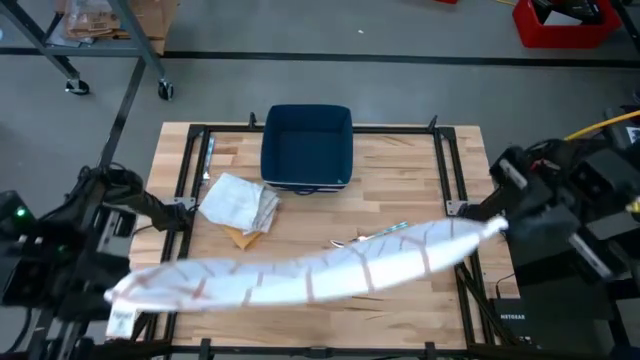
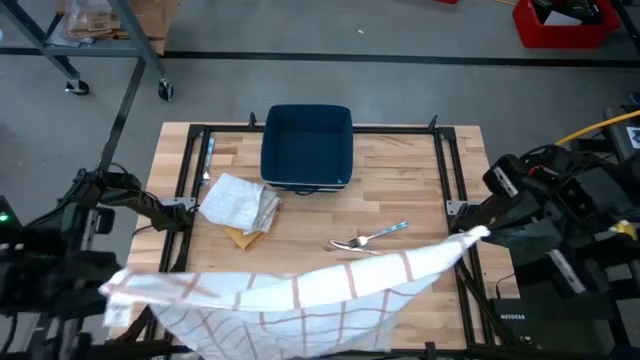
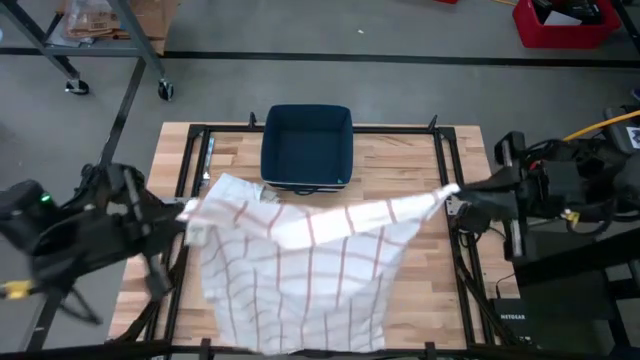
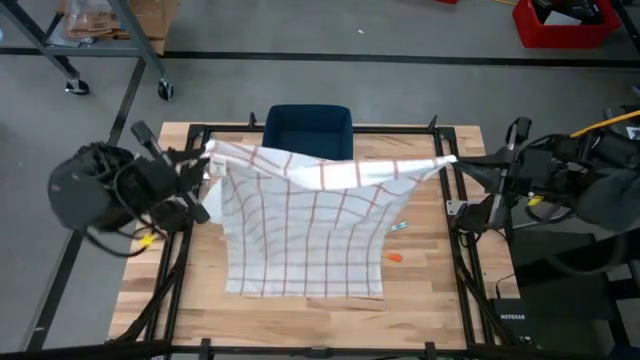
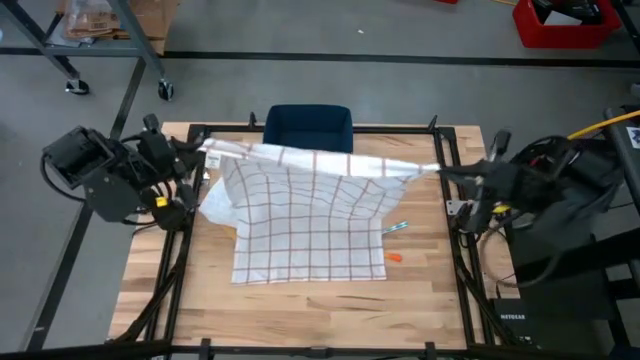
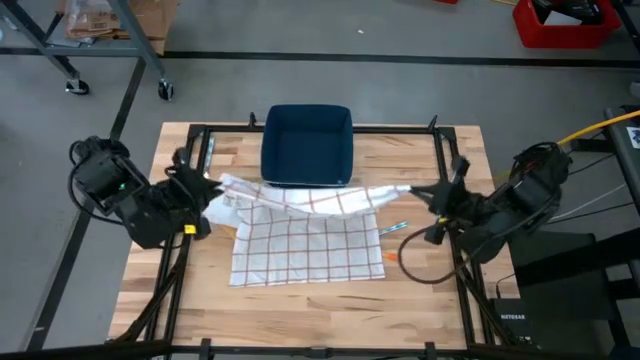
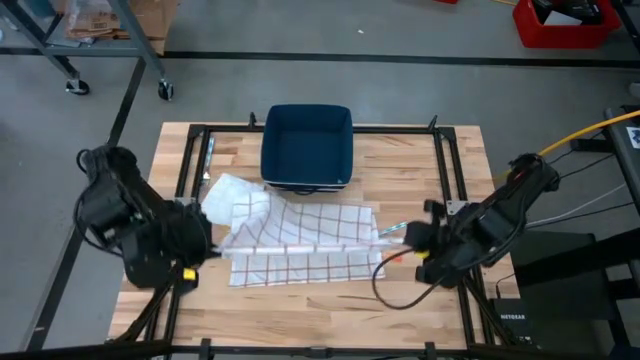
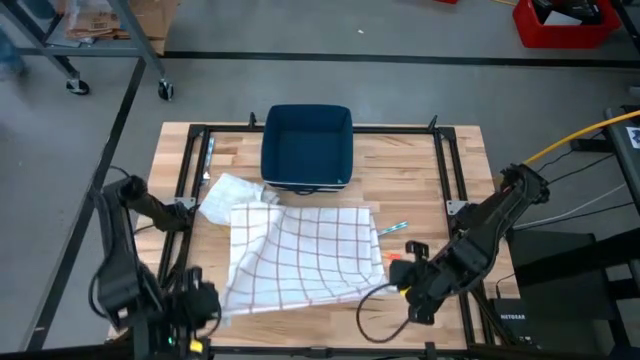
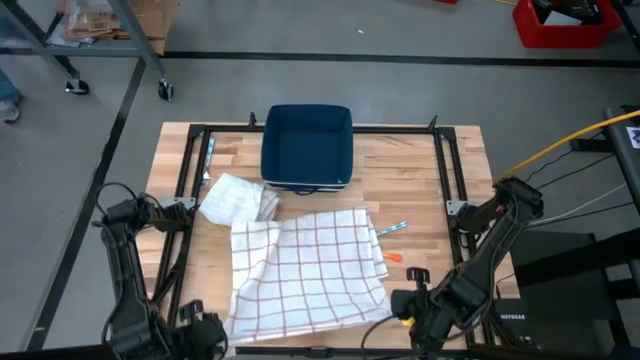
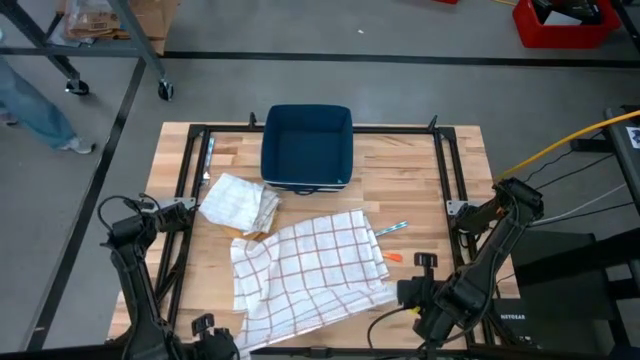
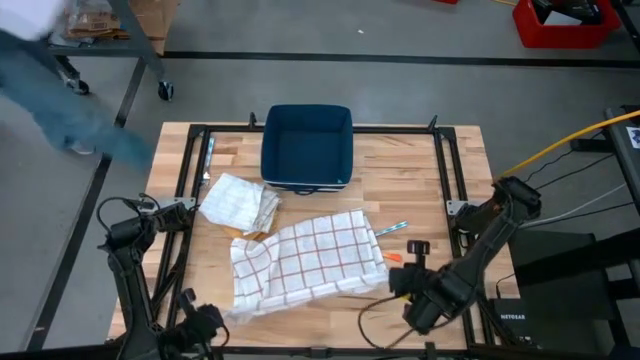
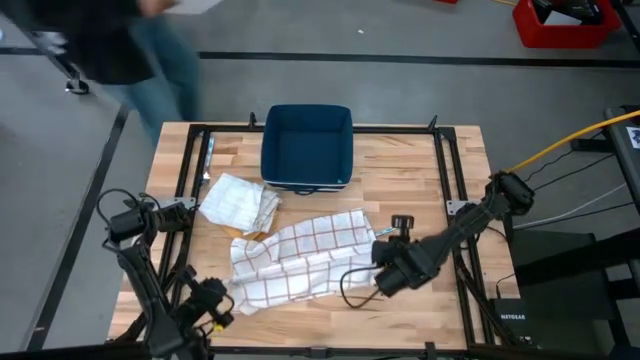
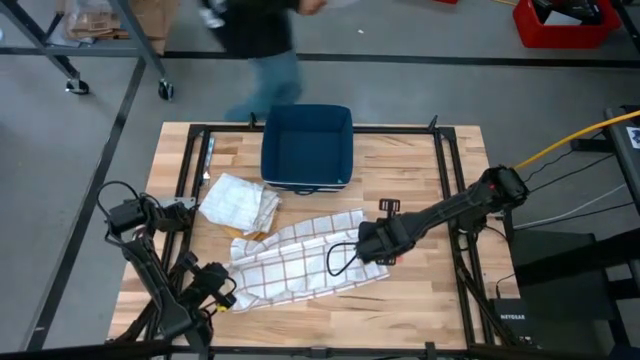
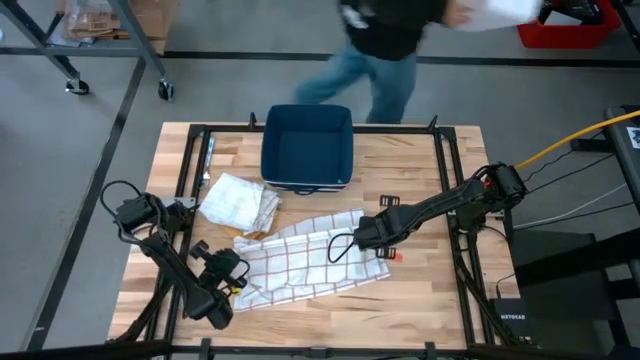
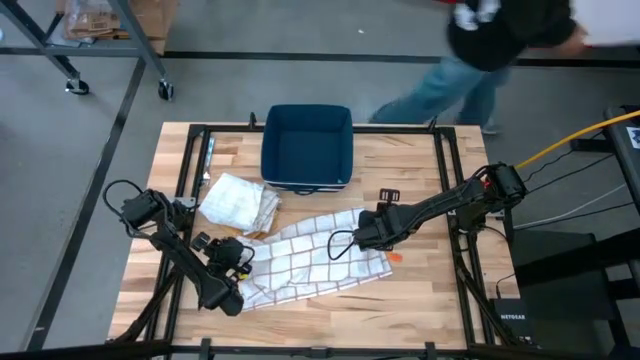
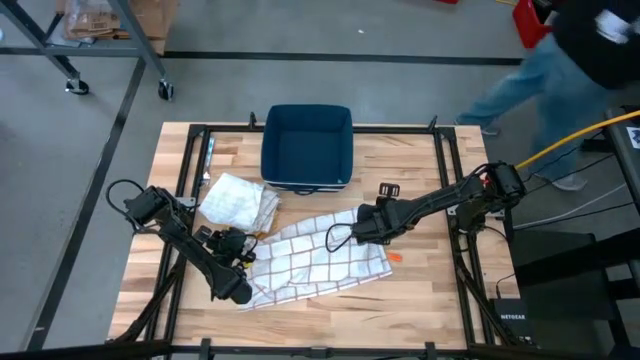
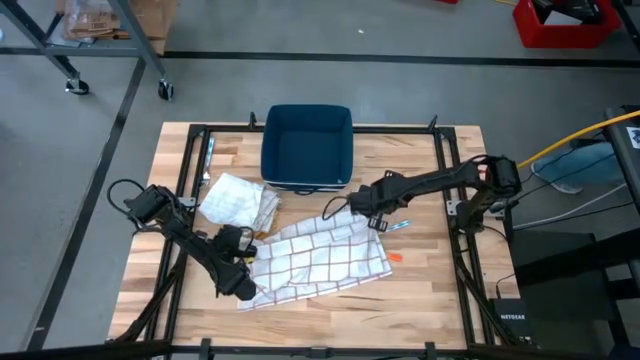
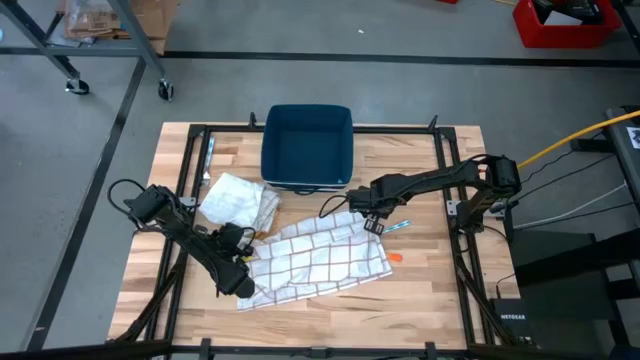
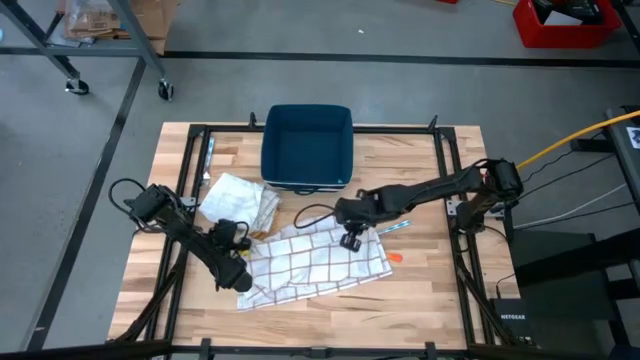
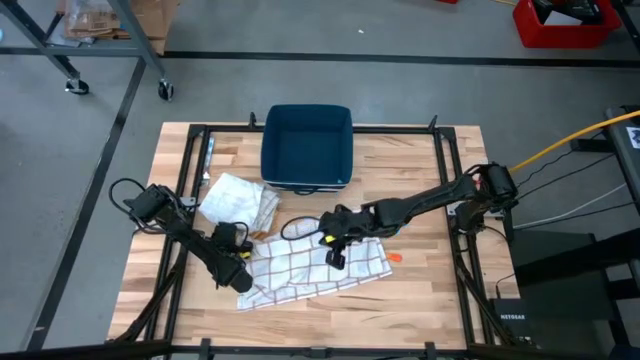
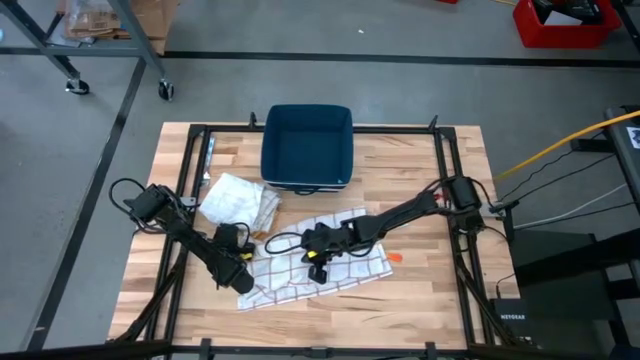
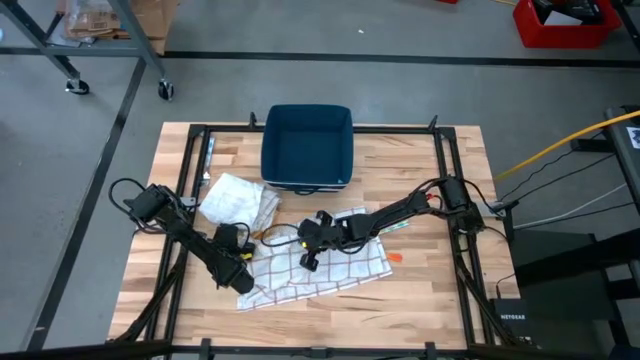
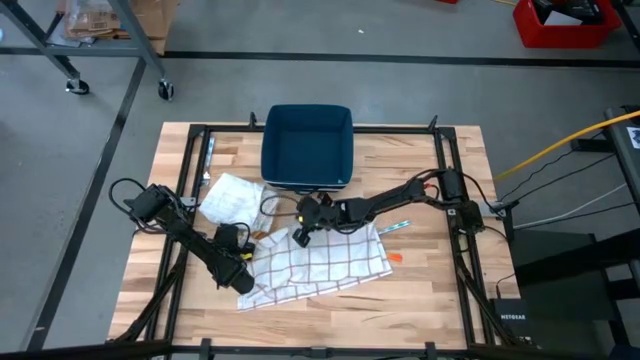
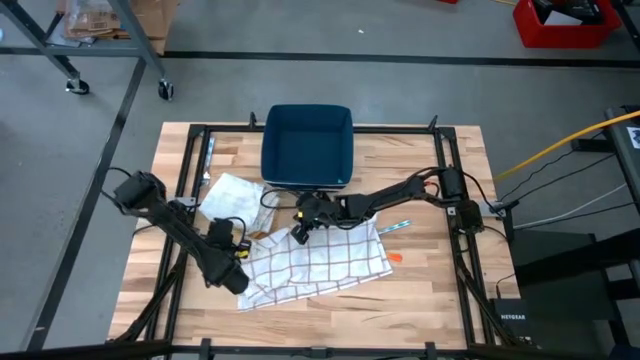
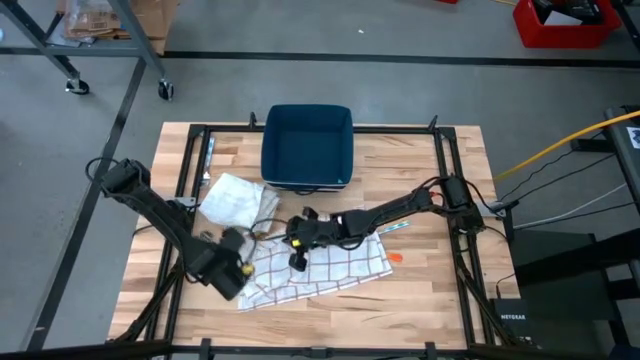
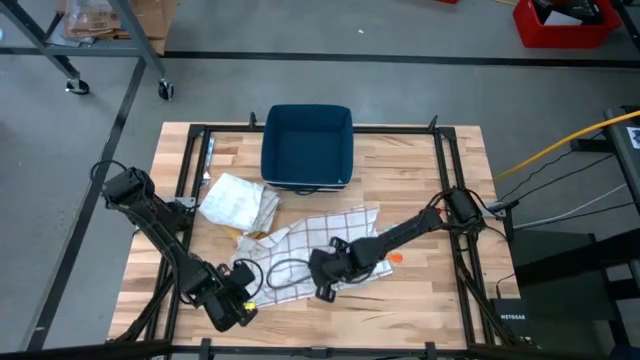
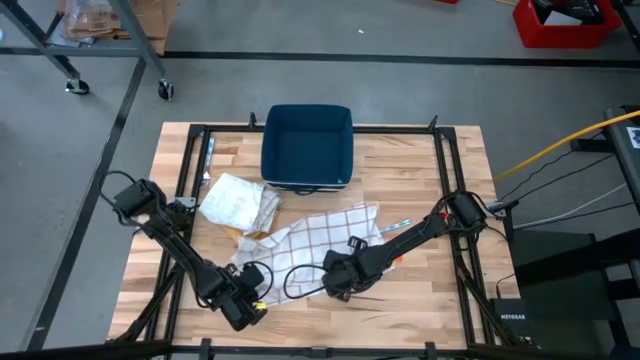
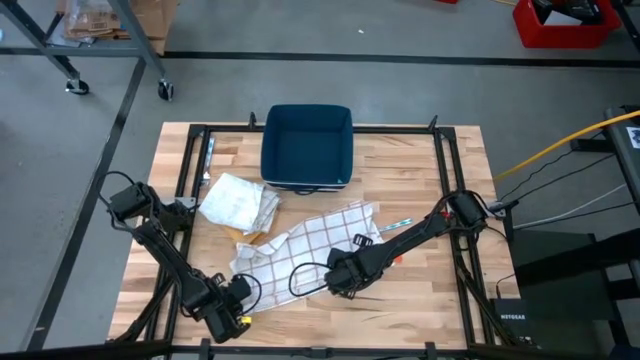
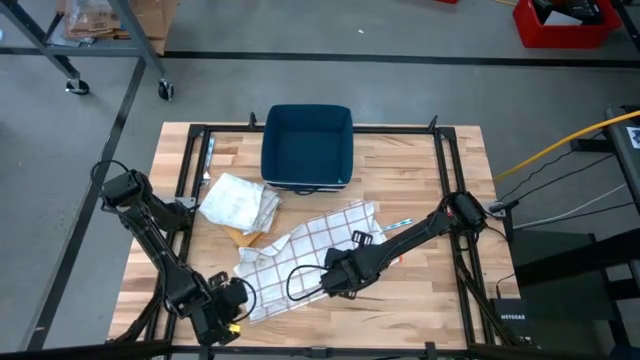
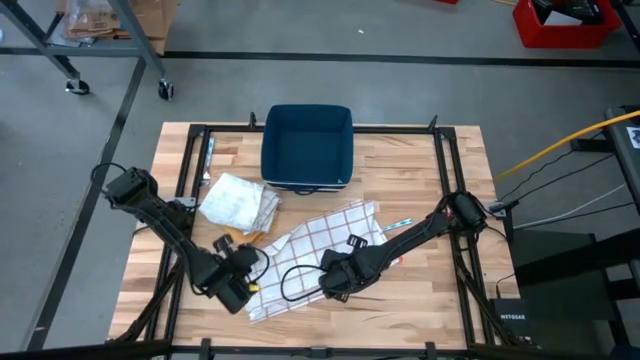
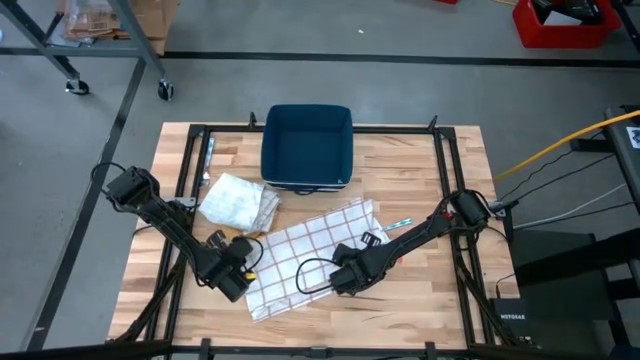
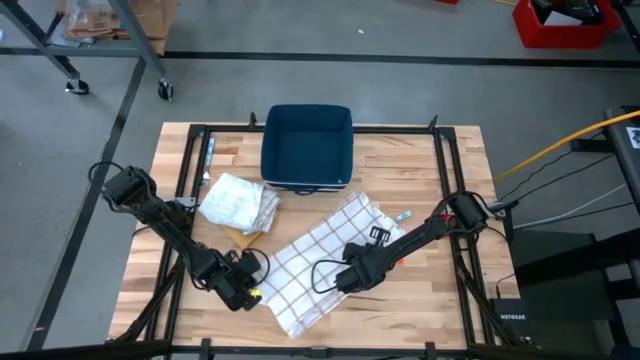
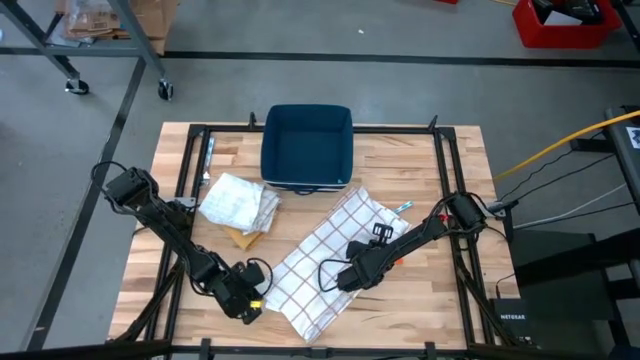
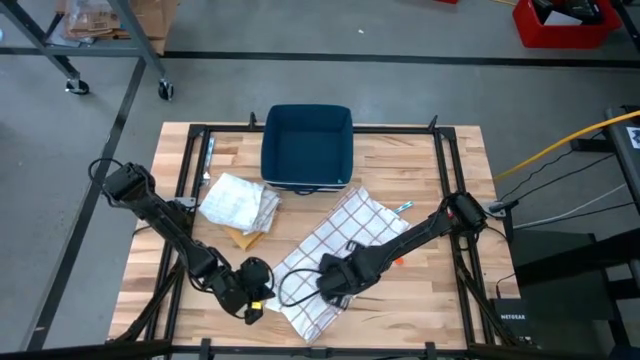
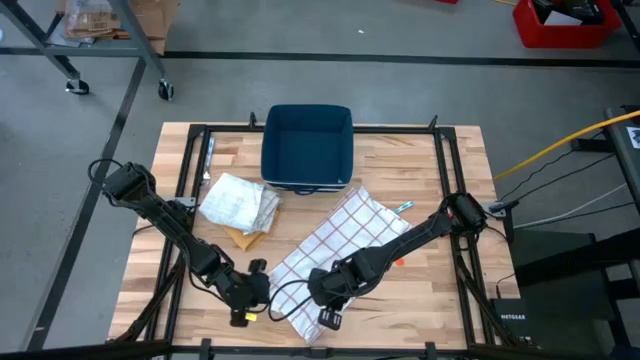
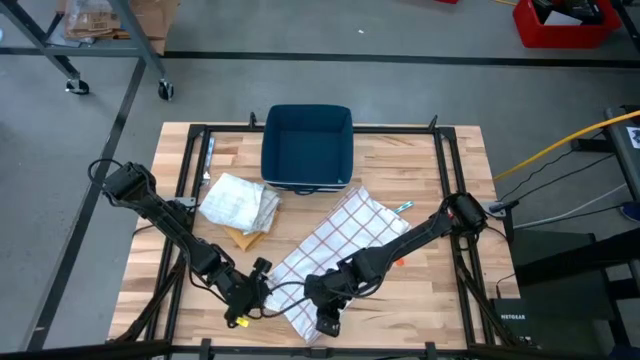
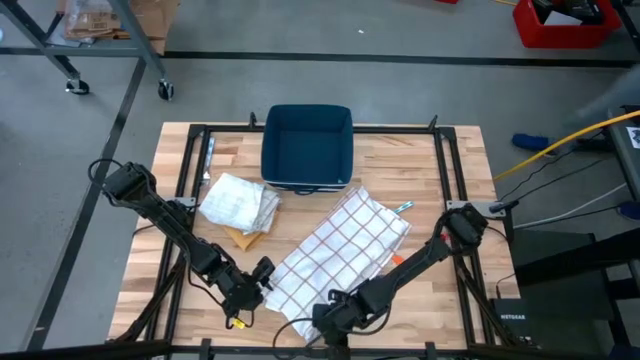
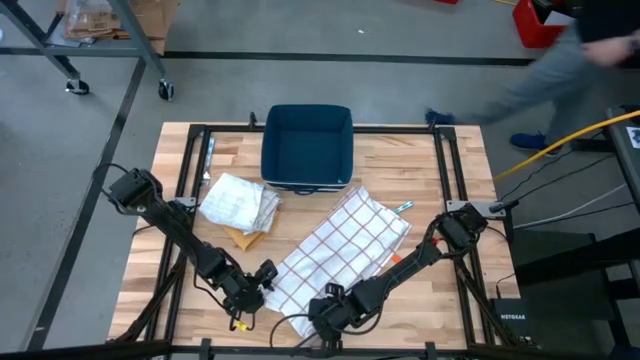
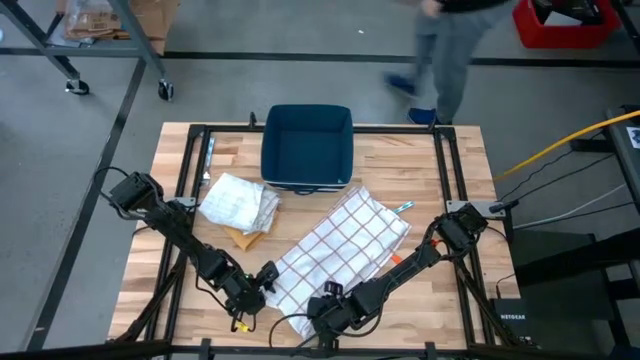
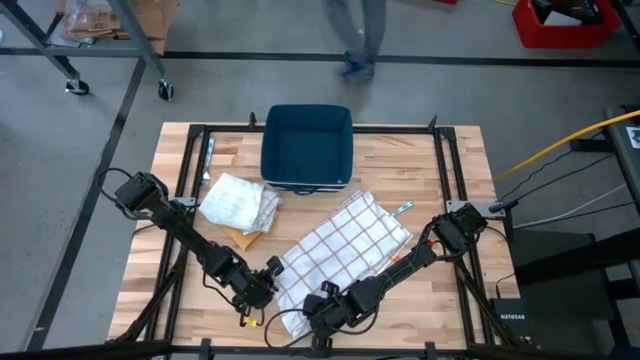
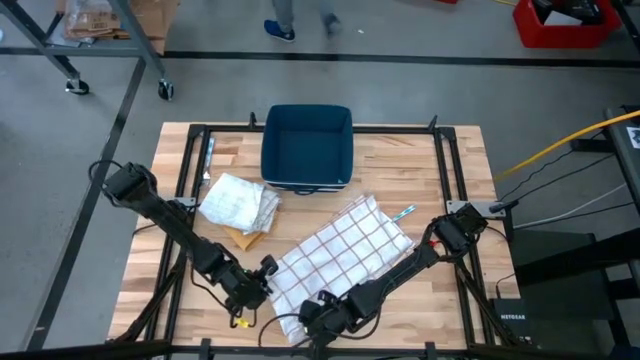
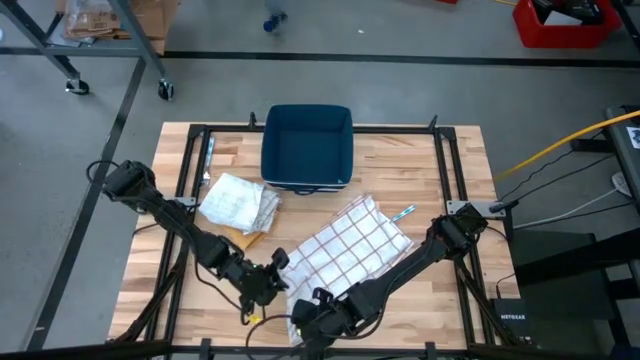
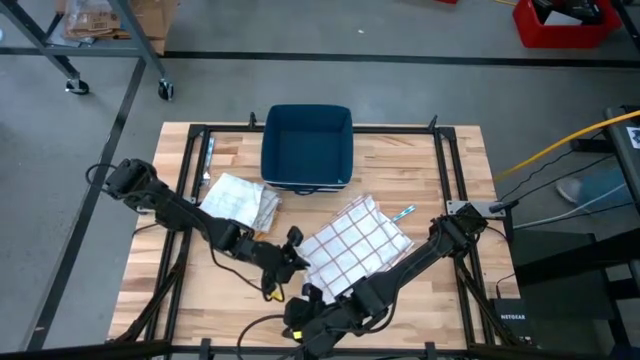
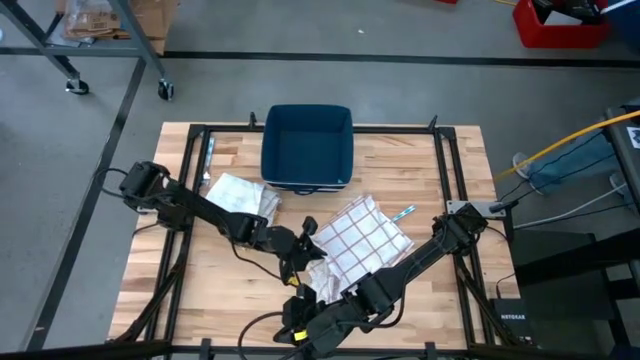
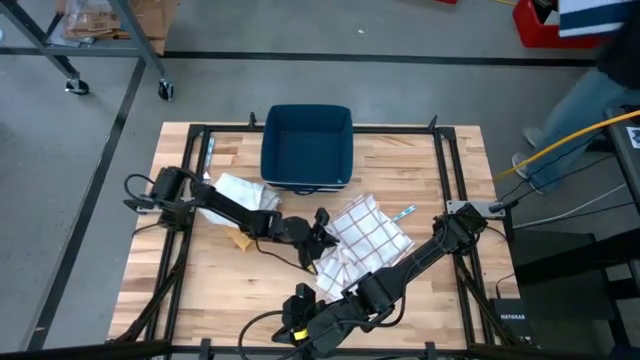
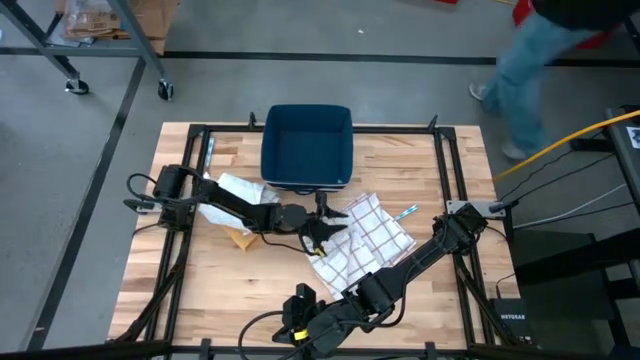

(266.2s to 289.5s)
Task: Fold towel
Fold the white patterned towel
